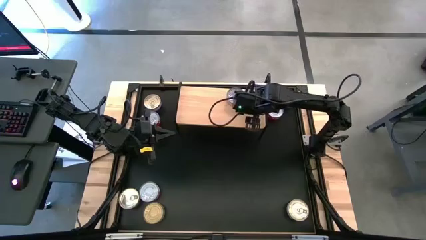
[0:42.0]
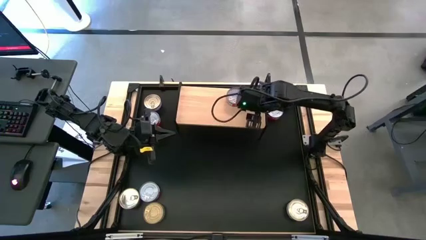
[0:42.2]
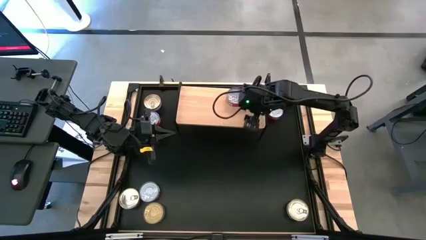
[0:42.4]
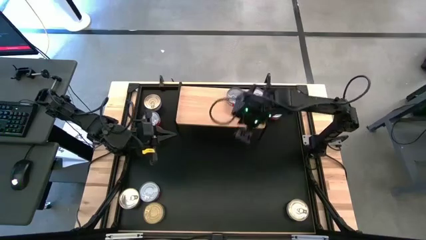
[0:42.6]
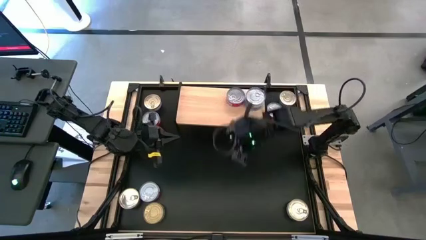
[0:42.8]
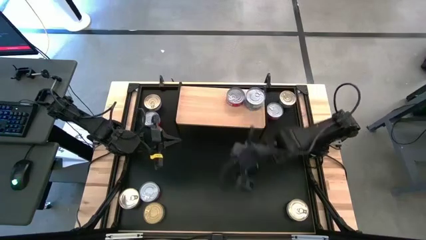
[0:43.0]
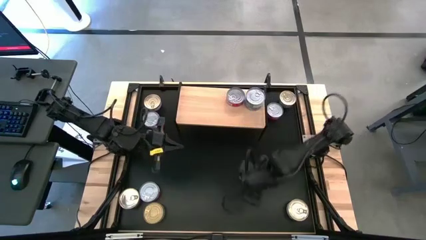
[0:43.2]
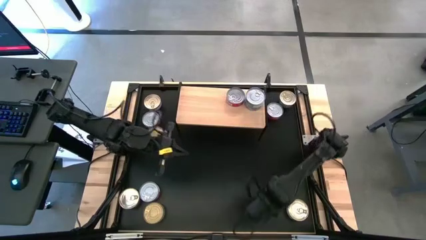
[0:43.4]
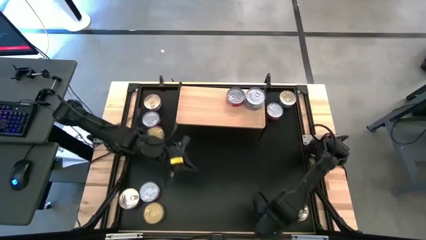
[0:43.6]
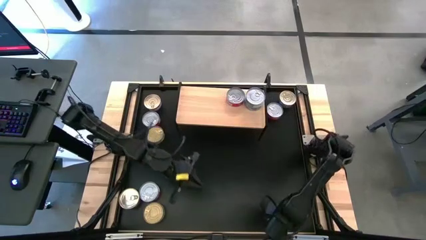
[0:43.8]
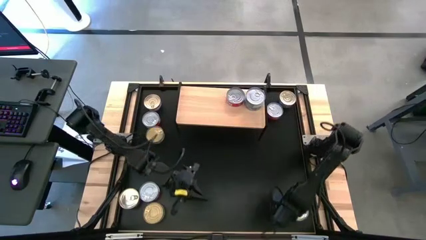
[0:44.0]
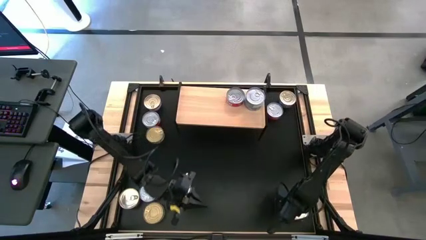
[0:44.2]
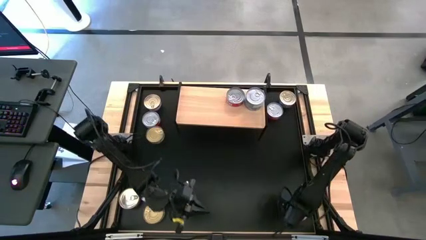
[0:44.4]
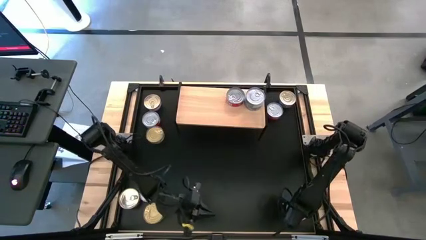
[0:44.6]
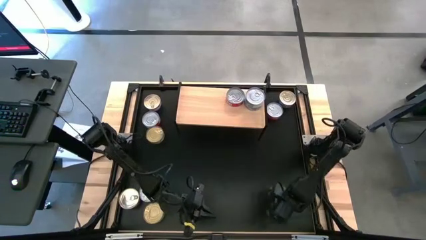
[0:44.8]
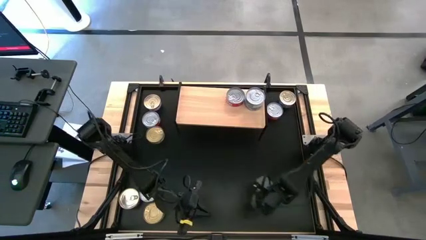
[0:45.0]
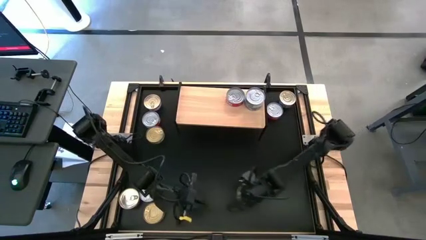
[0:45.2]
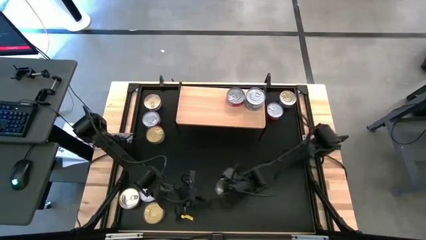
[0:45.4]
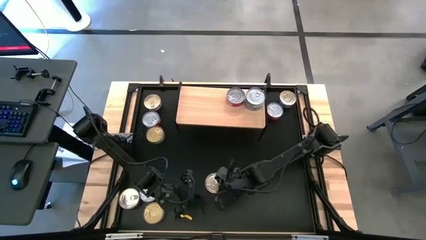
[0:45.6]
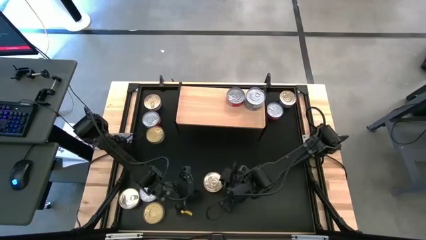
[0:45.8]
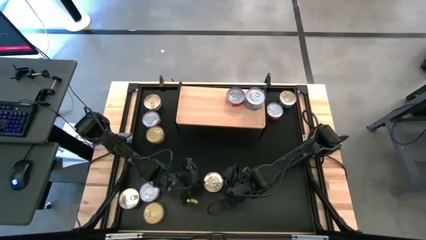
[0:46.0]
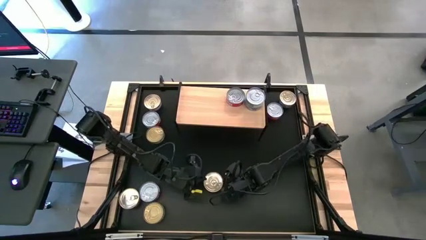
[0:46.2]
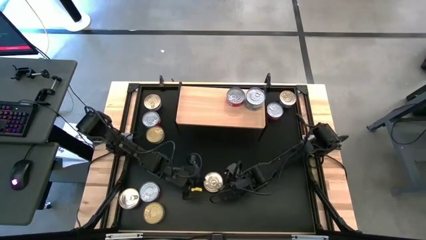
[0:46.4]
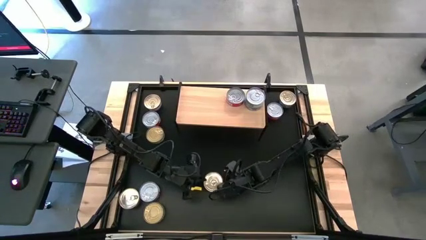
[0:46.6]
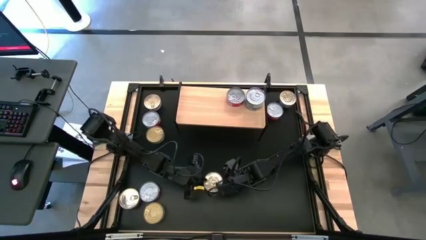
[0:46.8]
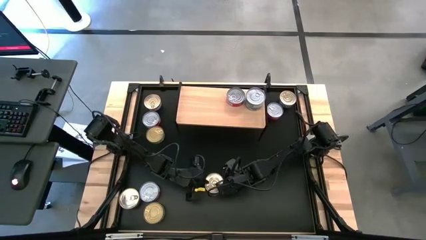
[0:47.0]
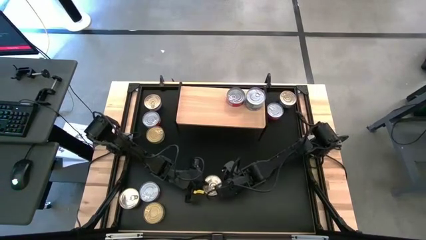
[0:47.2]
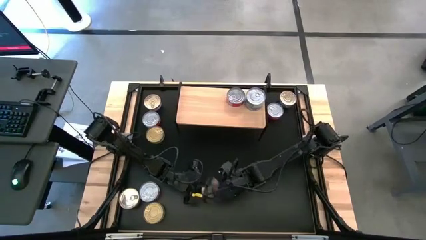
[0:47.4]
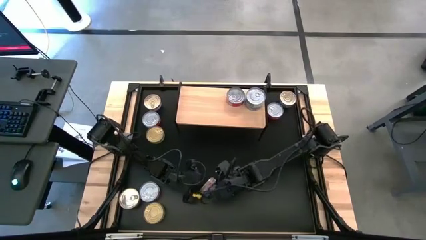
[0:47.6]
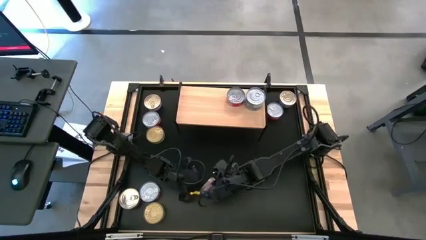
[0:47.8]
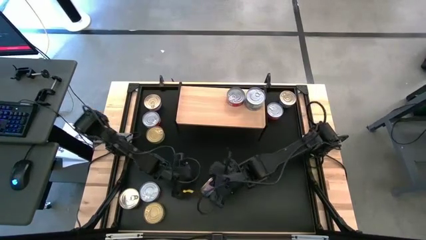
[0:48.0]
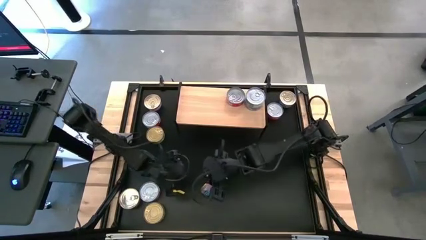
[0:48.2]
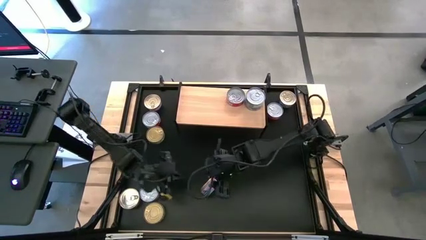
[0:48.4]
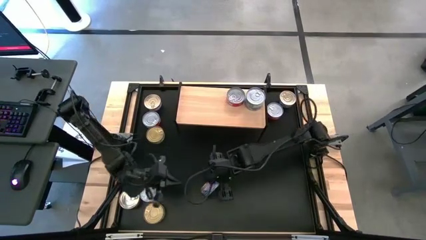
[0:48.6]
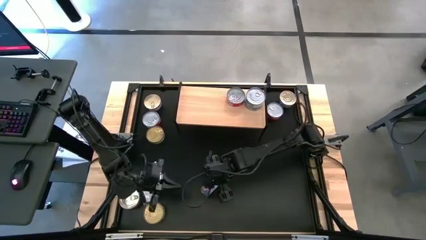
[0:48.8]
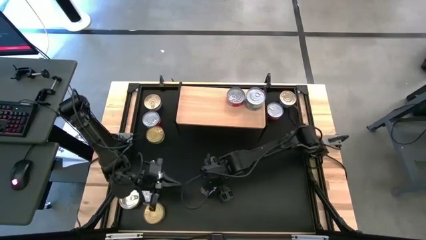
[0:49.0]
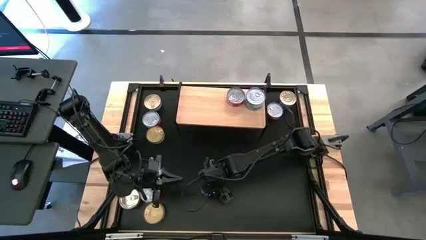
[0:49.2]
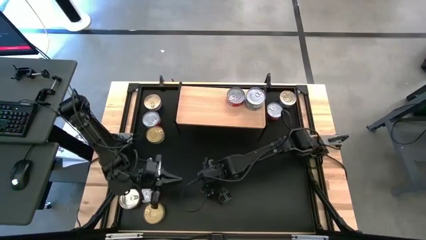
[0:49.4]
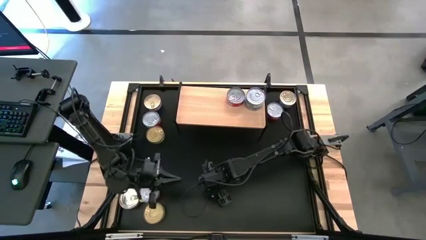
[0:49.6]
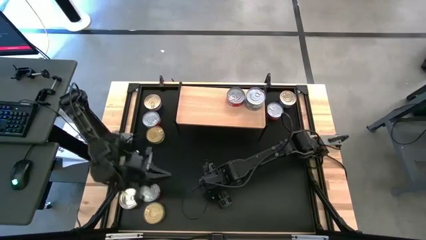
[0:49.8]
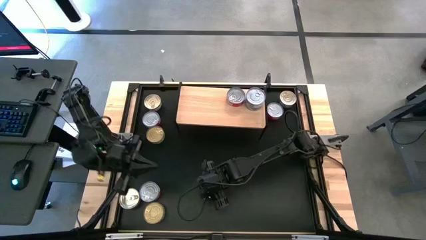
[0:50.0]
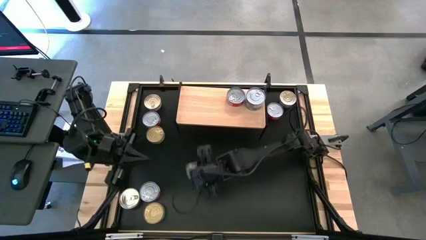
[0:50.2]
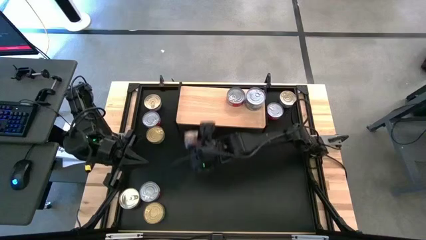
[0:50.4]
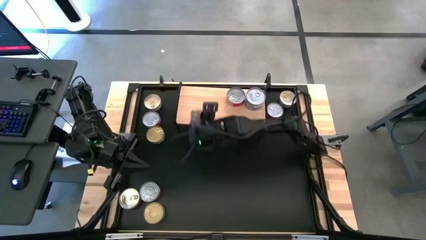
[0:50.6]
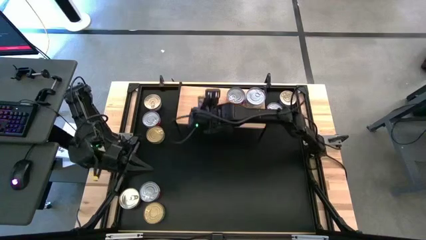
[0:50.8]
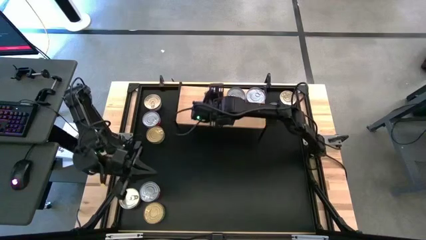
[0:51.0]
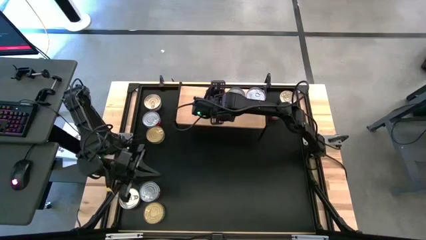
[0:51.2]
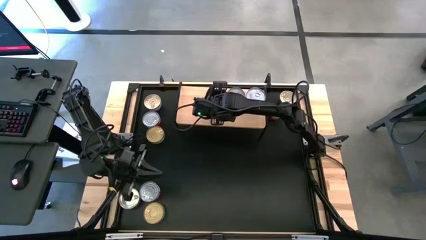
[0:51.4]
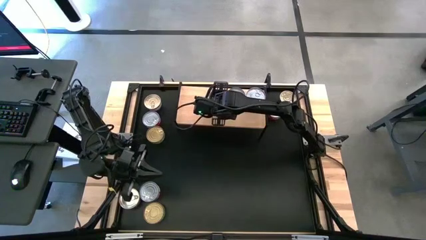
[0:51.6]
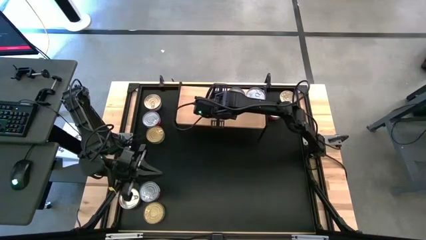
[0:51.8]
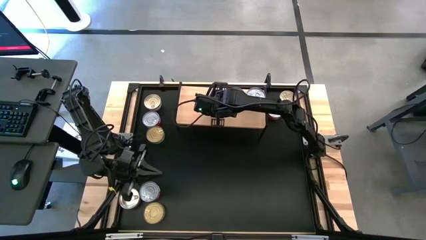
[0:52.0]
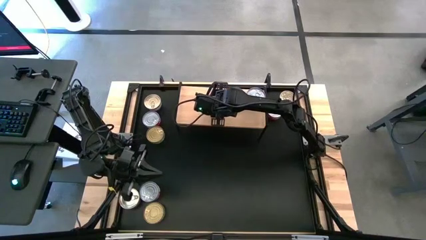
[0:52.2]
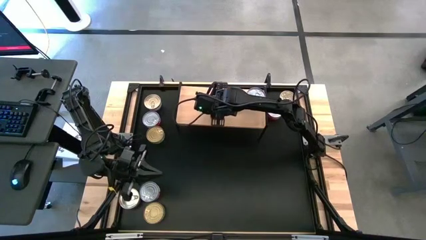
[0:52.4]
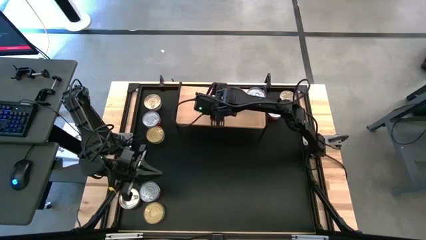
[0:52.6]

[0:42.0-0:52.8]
Task: Stack canned seafood by type on shelf
Put the blue tuna can on the shelf

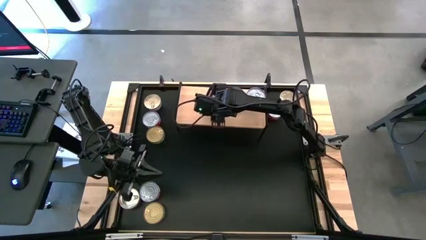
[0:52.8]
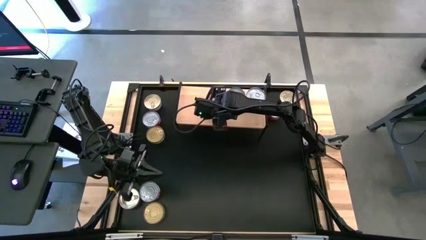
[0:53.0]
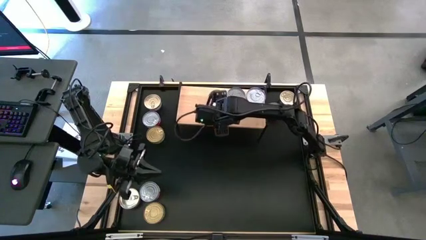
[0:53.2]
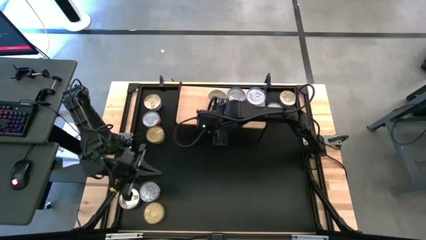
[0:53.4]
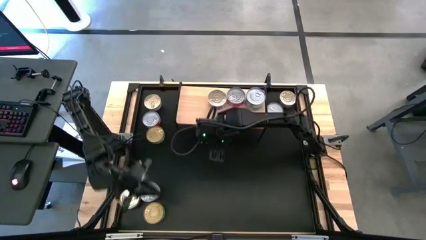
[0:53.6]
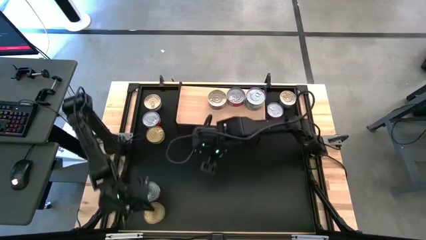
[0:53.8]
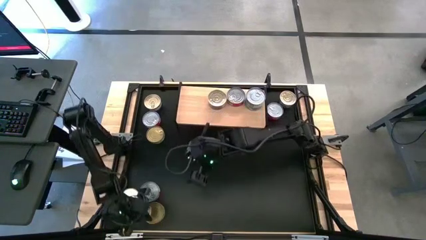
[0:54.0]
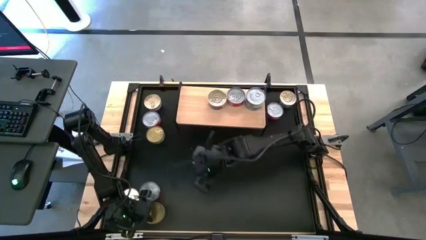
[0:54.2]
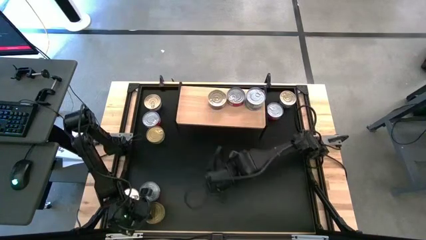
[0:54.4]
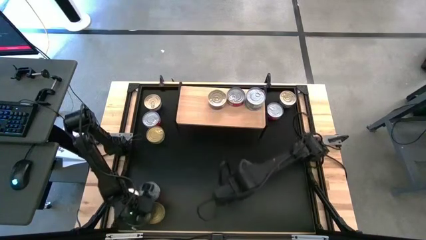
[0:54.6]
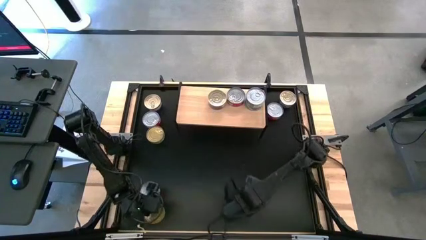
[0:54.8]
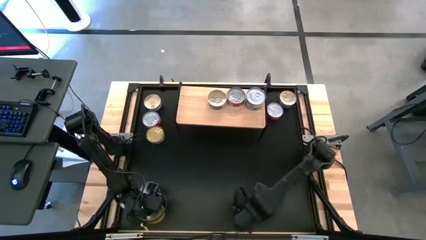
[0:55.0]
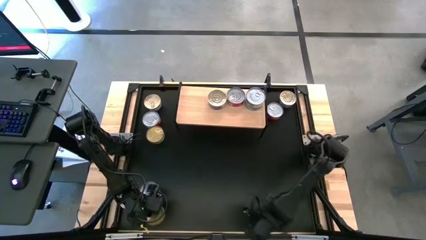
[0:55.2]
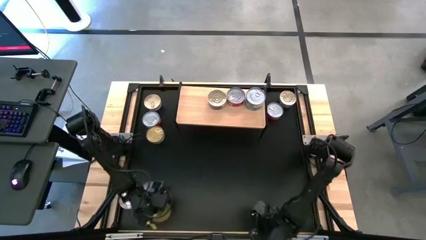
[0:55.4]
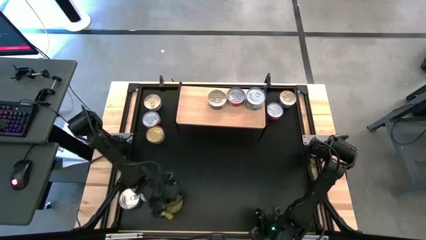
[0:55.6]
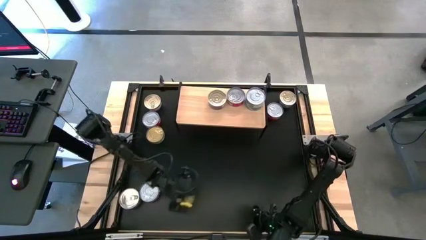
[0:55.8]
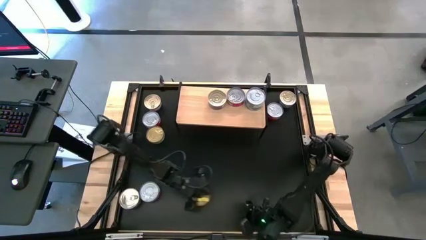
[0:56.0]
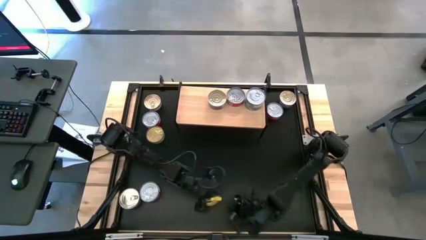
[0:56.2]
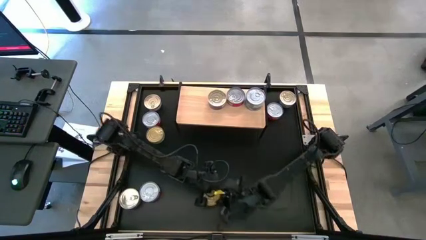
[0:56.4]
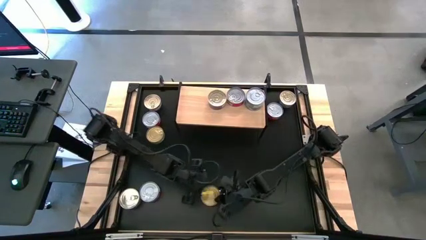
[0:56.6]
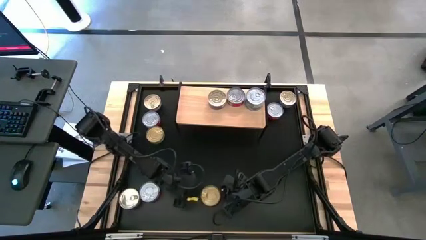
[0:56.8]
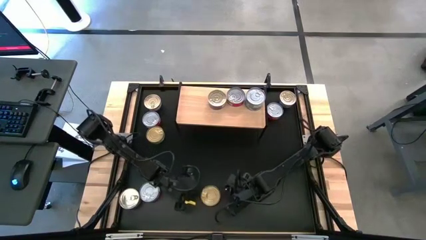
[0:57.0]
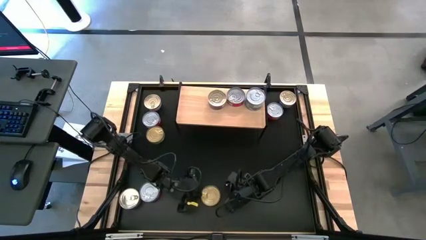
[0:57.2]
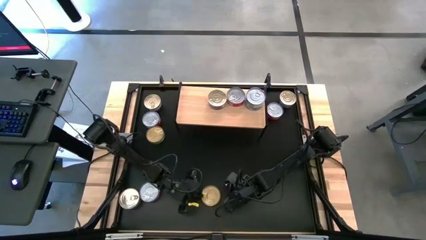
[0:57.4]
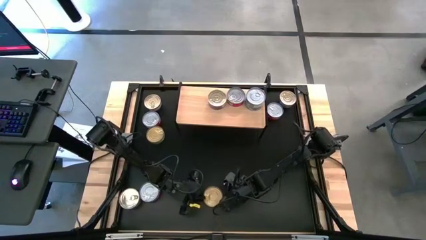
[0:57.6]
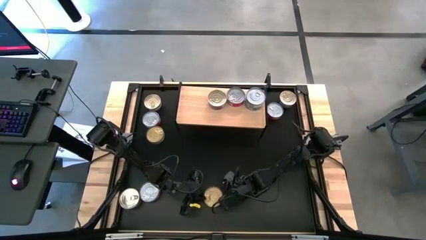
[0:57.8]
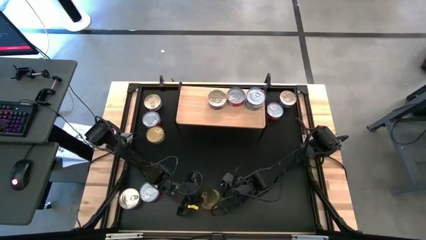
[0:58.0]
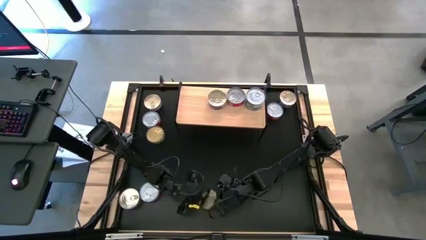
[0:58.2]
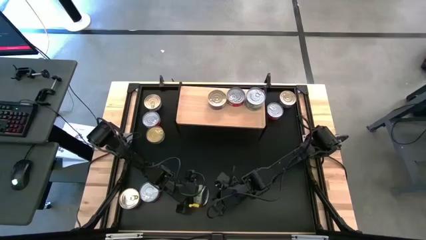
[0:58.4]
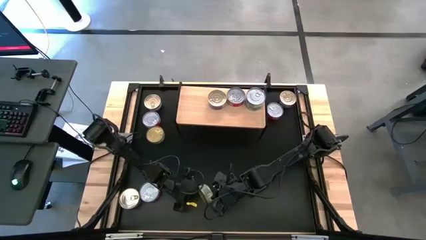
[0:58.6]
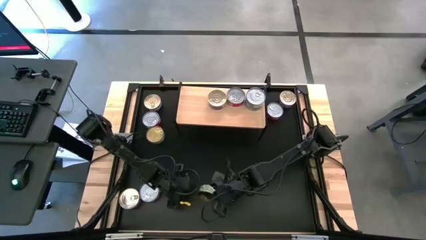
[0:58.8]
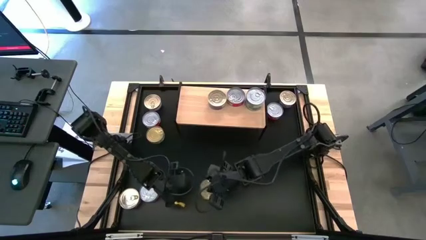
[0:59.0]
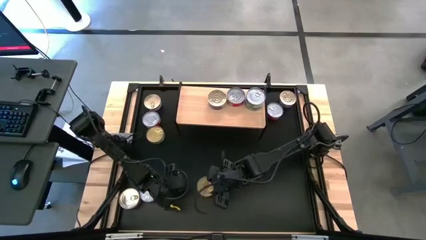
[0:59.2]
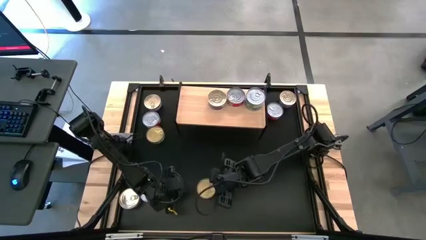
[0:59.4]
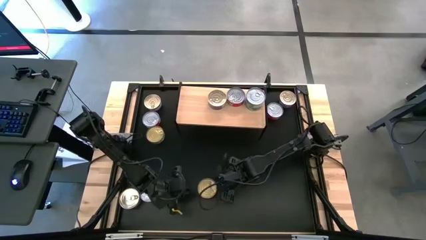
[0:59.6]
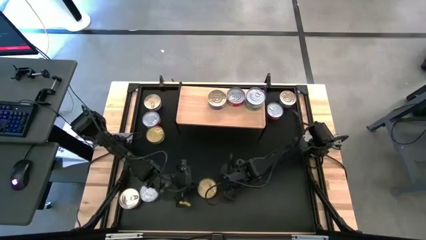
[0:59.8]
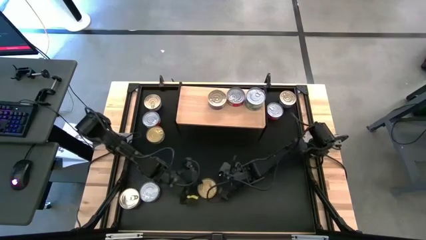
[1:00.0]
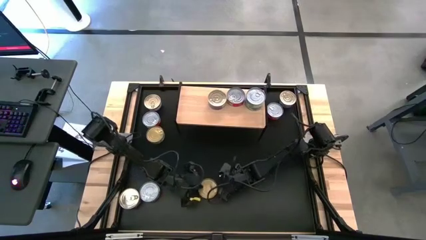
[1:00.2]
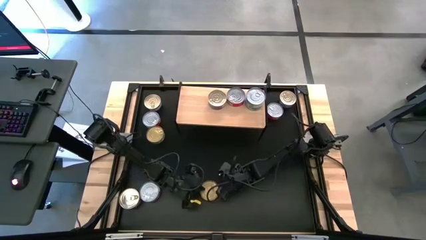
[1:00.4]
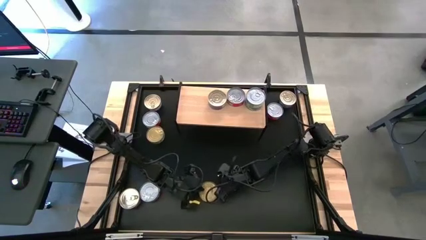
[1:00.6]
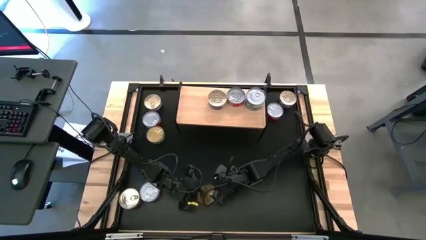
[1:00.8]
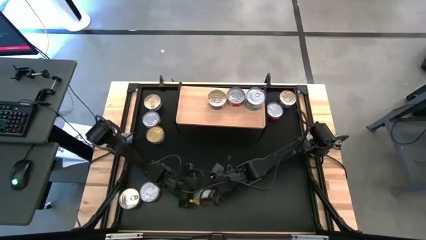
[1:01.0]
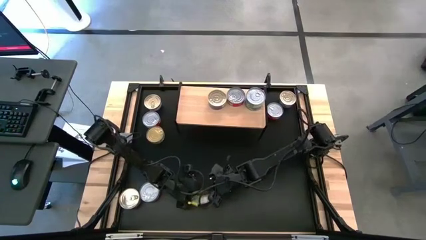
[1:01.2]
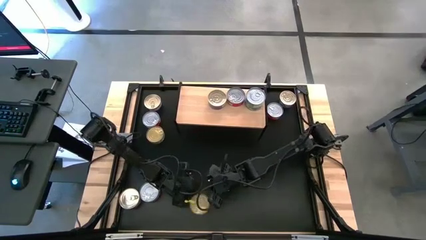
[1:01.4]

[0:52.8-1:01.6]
Put the green tuna can on the shelf
